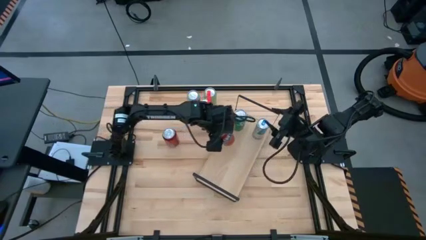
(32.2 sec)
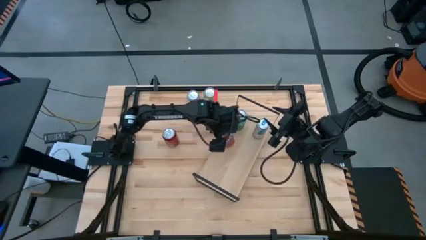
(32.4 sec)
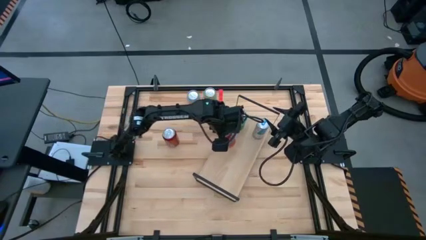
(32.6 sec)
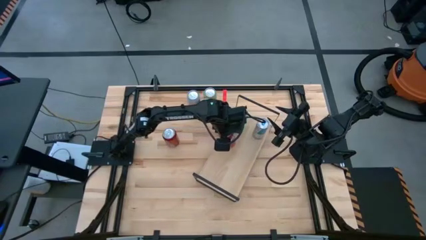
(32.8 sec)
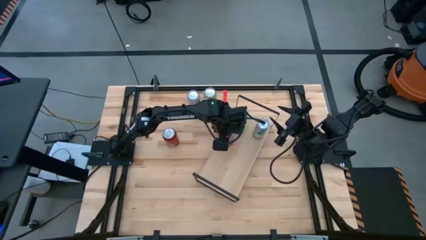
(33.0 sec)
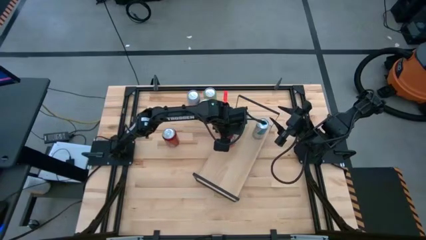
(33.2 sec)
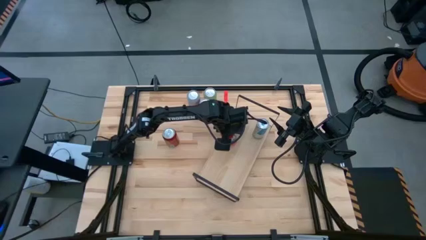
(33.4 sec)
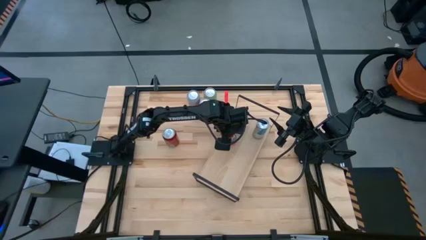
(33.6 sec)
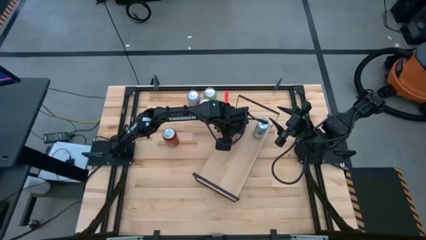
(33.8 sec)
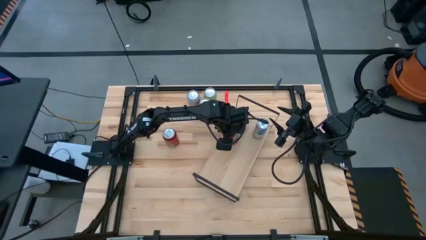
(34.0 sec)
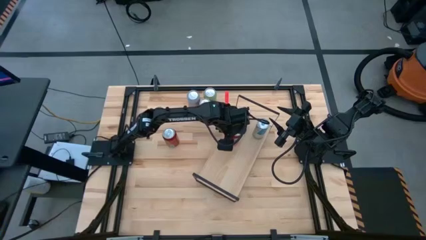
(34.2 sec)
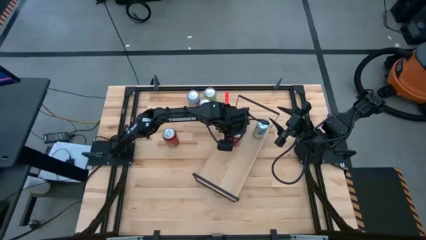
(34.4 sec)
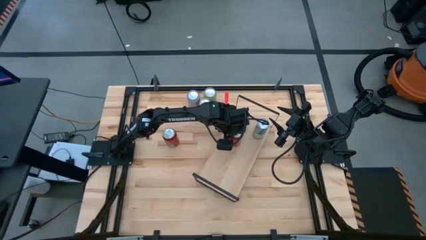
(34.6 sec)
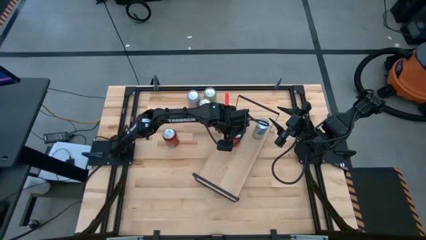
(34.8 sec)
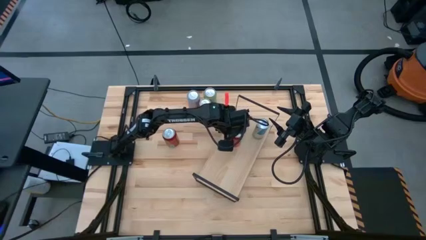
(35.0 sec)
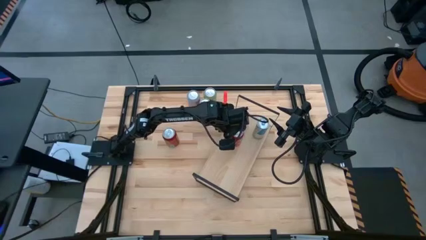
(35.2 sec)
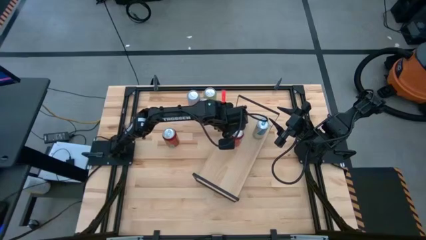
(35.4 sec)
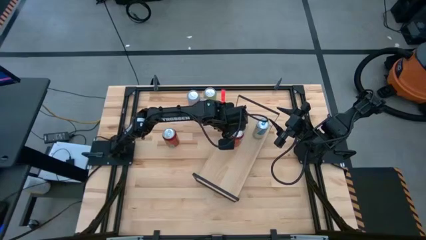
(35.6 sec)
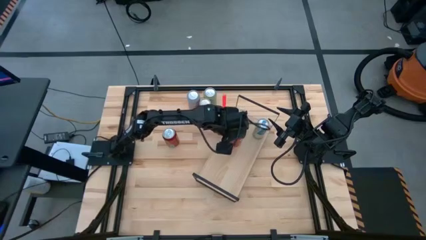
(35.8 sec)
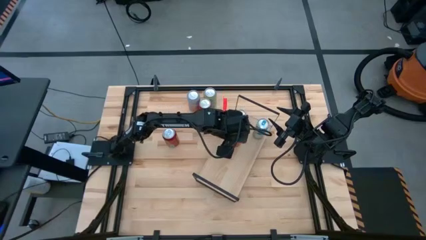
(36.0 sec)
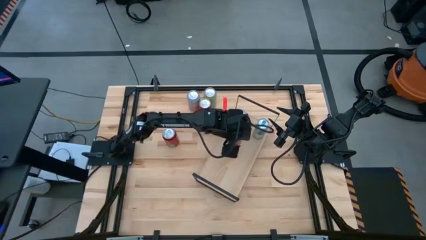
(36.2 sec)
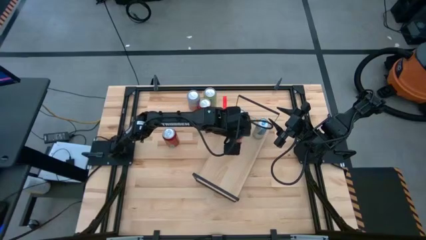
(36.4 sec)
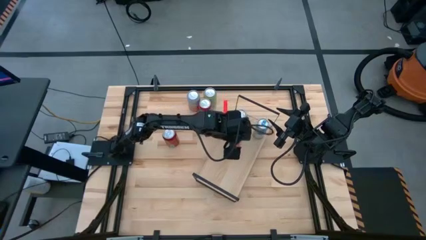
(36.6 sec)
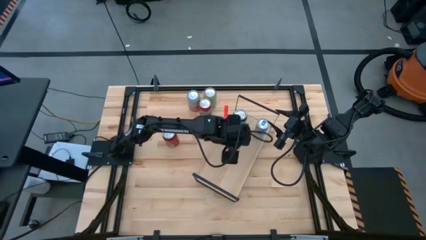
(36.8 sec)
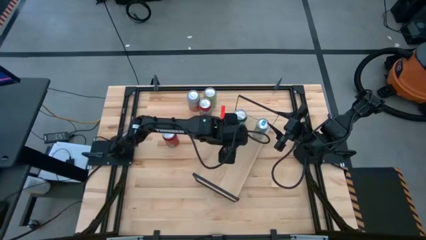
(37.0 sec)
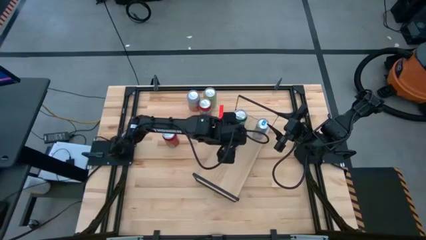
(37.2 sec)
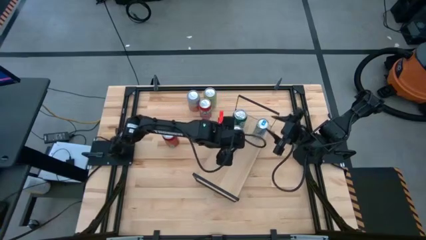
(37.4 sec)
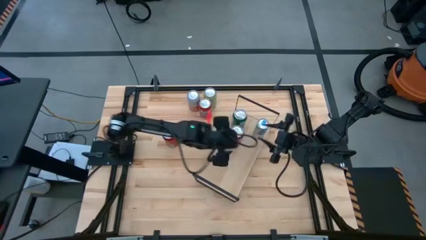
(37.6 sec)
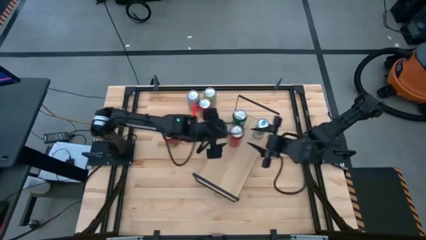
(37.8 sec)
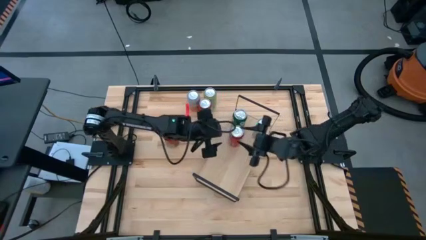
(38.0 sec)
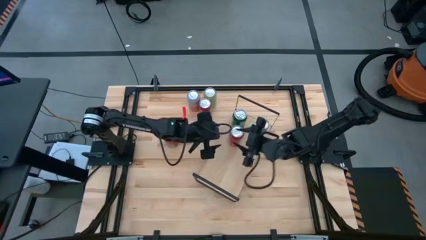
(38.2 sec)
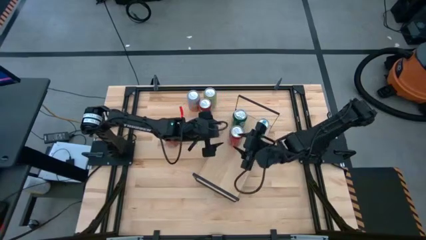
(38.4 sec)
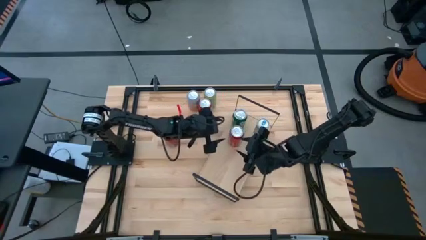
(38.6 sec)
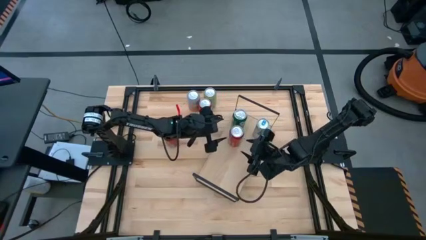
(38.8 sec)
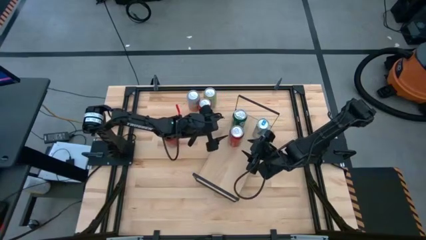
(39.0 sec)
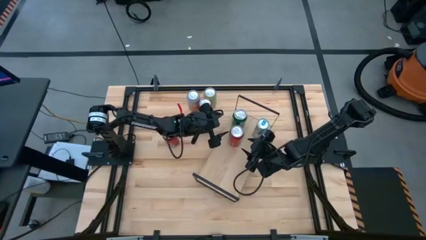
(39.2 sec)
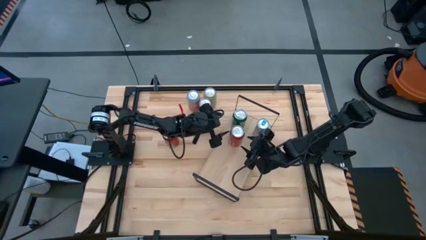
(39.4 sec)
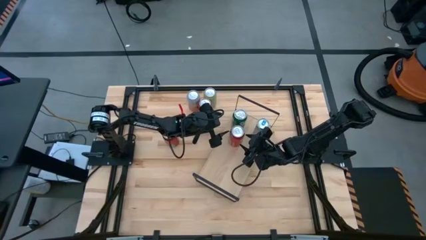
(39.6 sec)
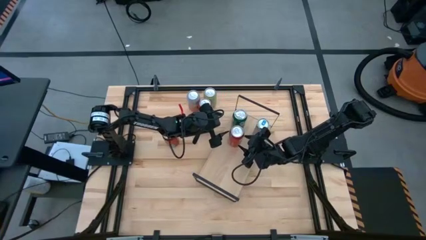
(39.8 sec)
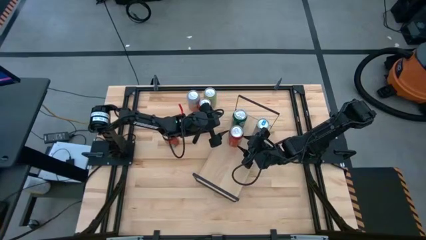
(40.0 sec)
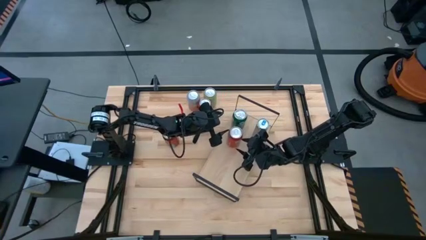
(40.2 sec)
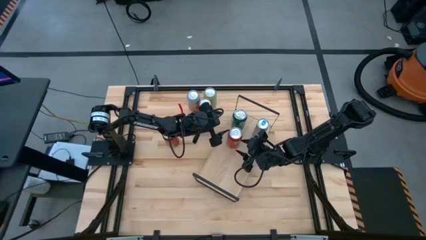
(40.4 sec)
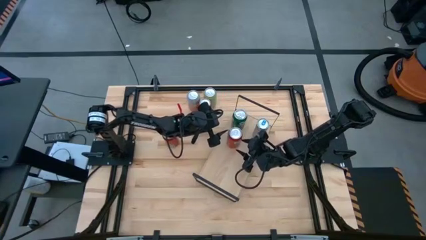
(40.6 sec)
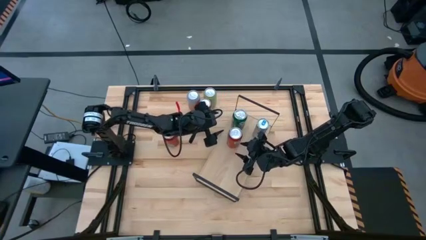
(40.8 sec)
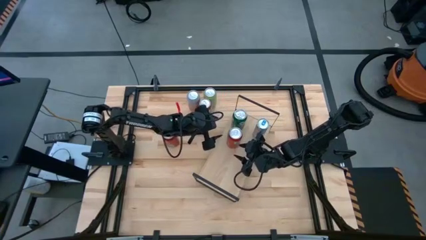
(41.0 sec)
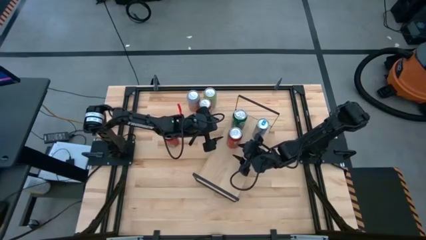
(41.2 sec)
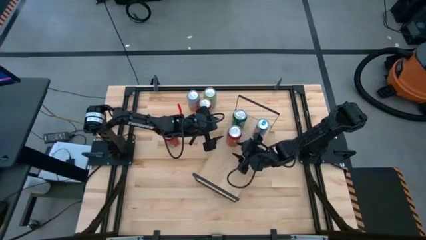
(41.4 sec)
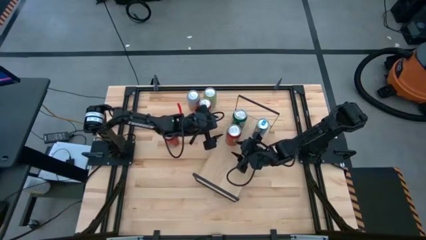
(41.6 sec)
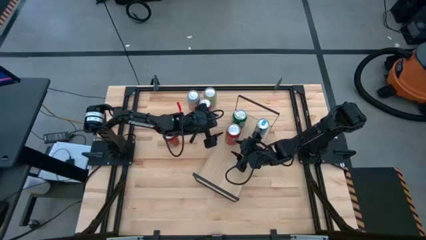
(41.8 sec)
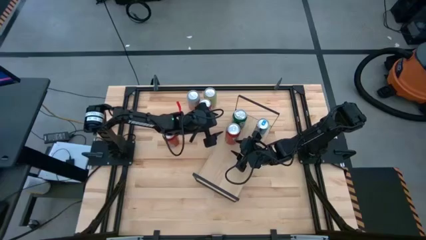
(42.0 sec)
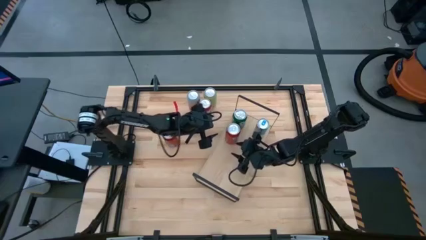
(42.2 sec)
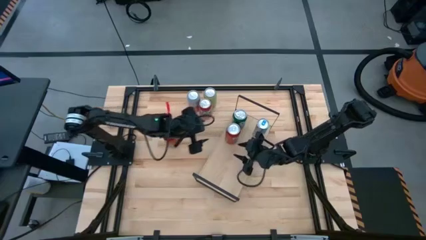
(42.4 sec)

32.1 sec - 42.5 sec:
Task: Place canned beverage on shelf
Put the bottom orange soda can on the shelf

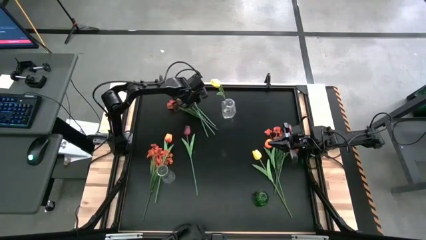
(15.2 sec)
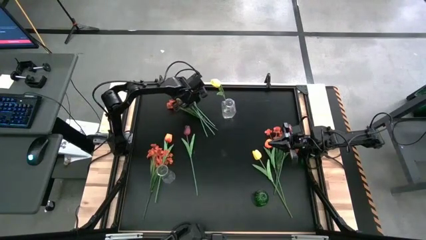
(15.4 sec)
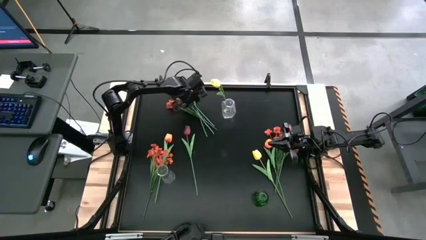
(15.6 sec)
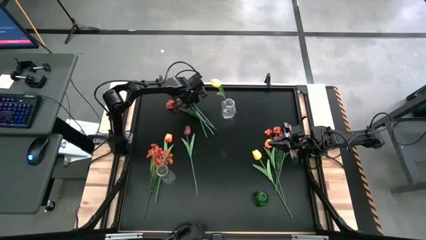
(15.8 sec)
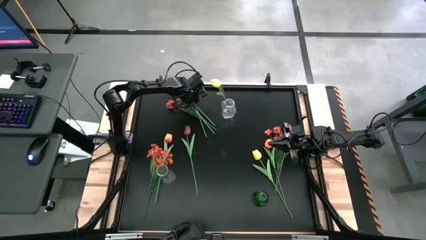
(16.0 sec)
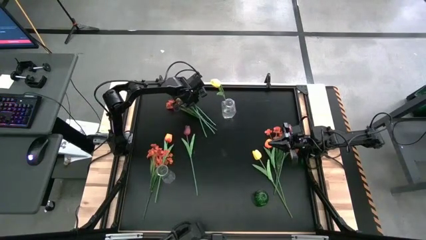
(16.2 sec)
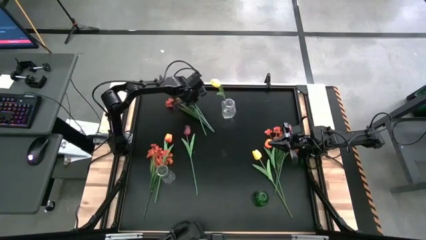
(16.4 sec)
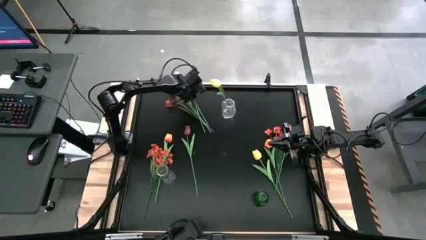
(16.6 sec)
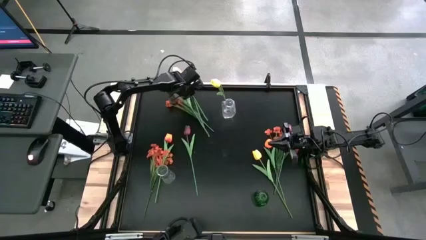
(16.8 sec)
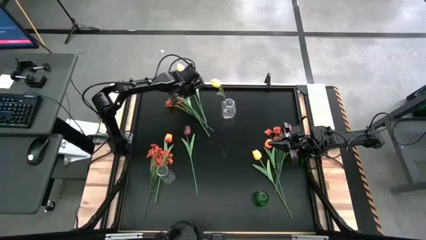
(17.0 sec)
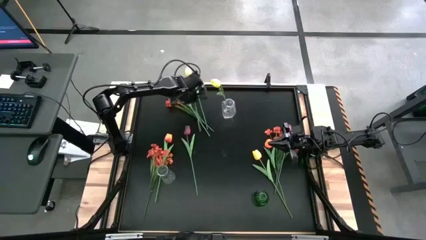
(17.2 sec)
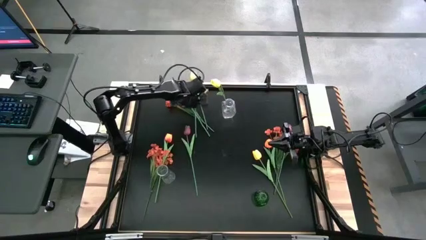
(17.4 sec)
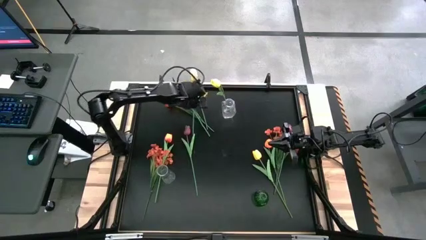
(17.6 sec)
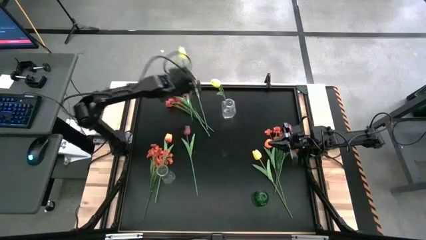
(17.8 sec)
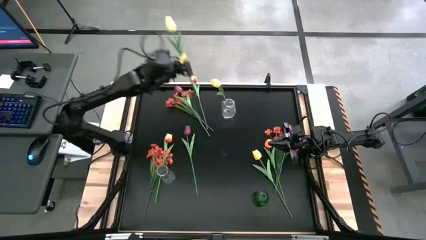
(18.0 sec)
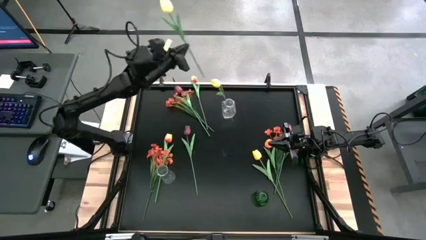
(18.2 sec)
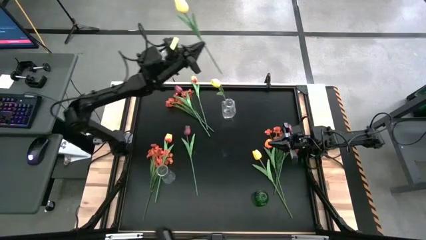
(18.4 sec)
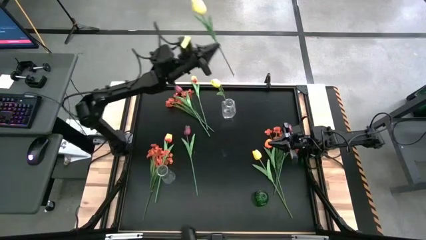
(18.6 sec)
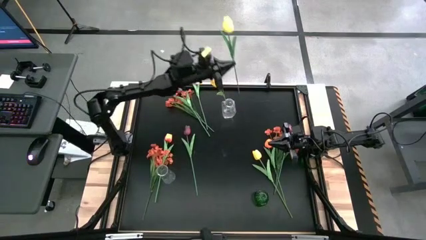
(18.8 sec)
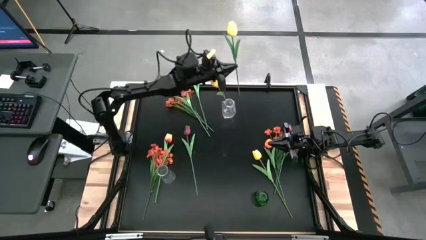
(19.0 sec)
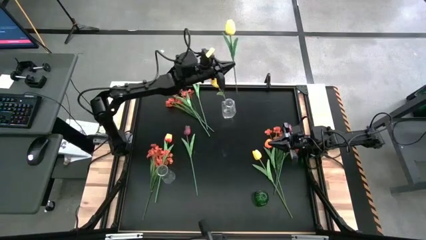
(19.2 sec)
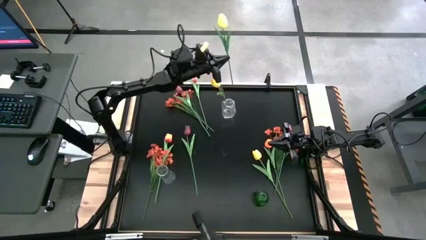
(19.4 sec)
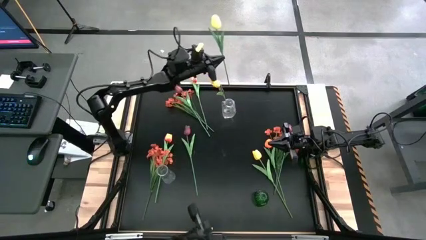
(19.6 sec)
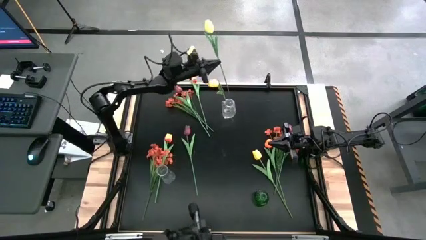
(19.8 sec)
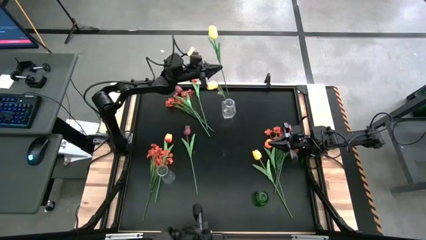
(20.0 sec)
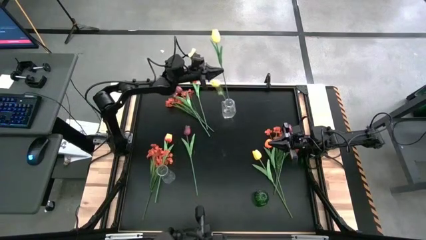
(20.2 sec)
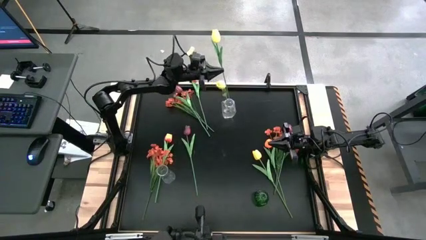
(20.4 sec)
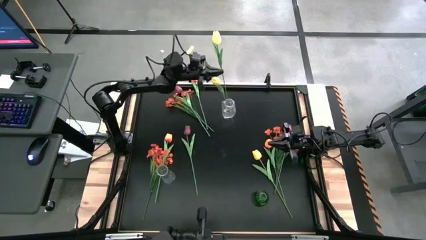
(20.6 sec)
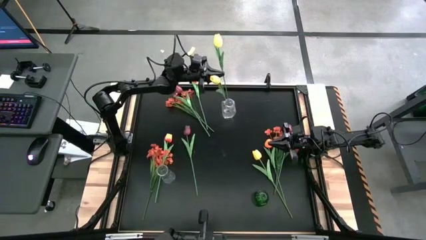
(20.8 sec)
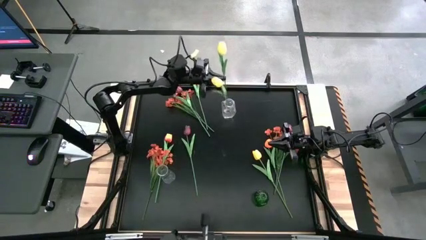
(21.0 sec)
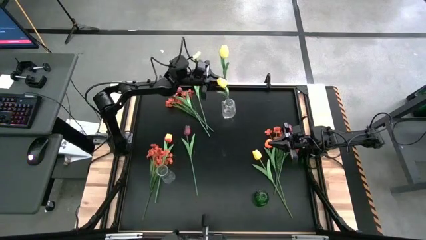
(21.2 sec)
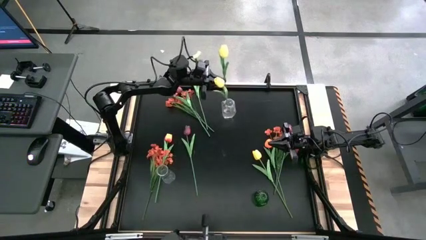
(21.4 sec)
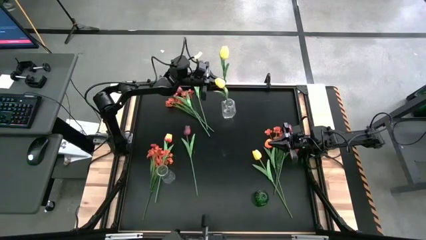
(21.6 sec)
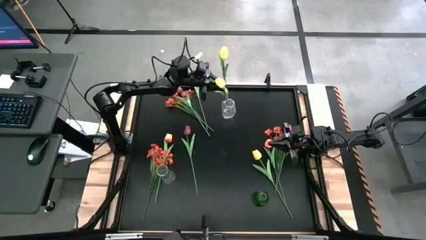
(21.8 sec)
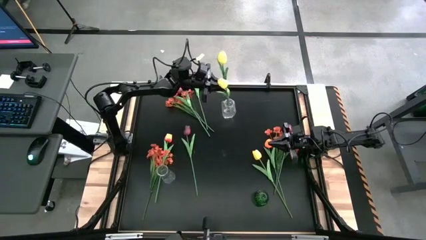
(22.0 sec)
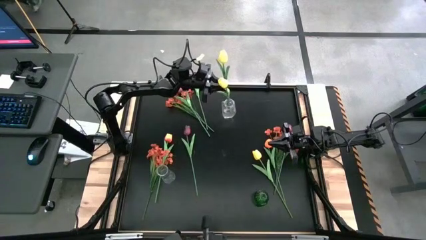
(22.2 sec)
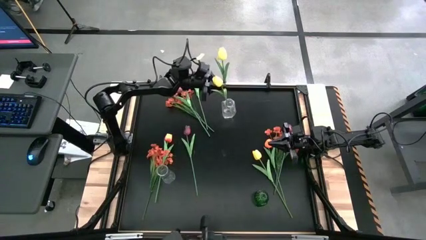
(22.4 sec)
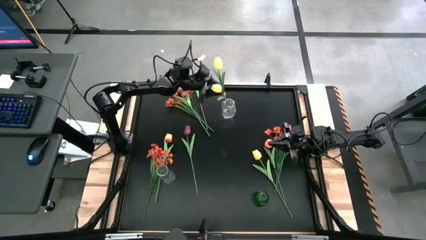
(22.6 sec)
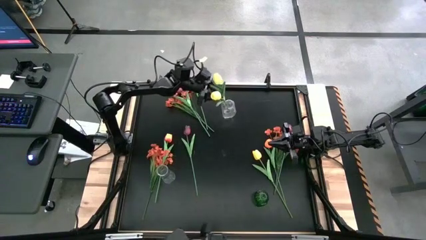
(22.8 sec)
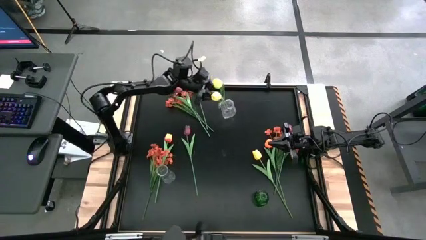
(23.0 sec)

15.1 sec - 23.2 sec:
Task: Sort flowers into vase by color
Put the top yellow tulip into the top transparent vase
